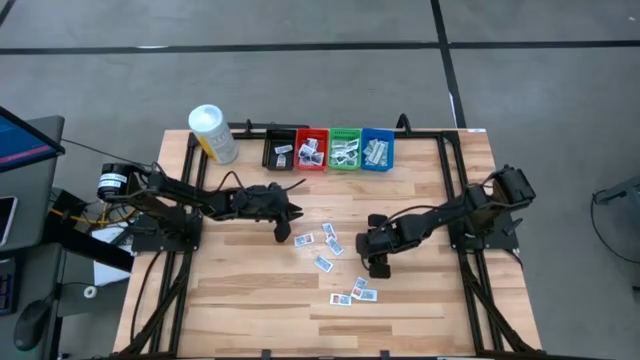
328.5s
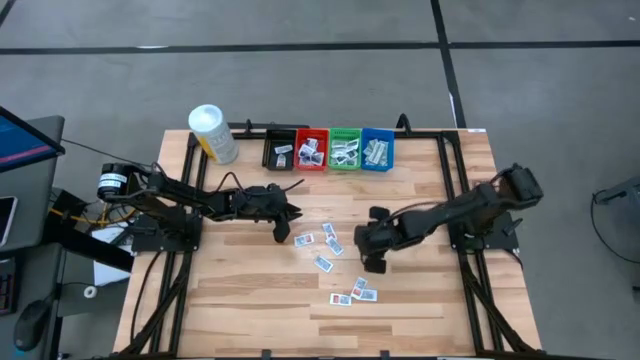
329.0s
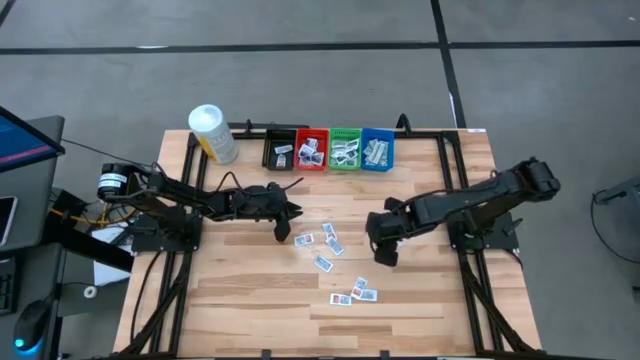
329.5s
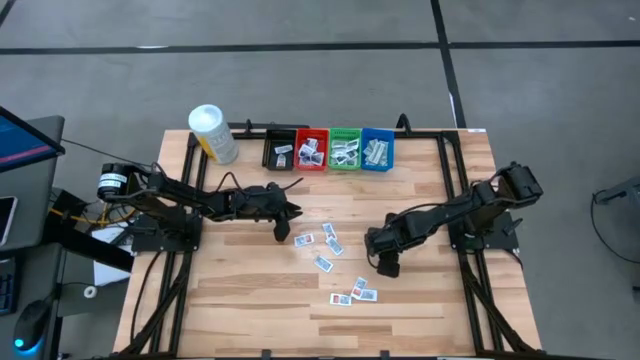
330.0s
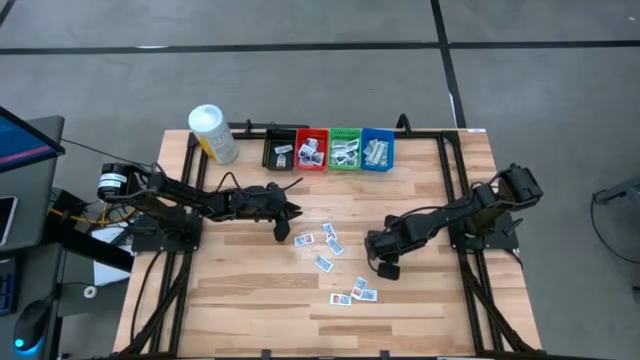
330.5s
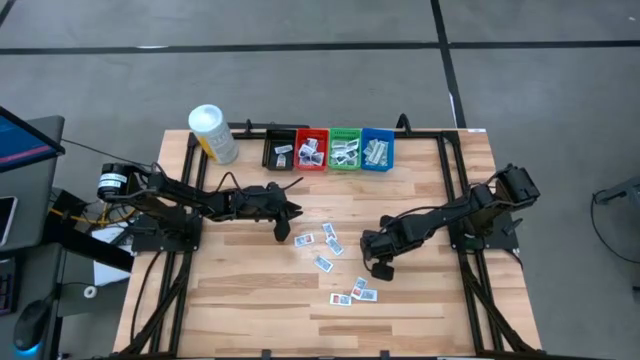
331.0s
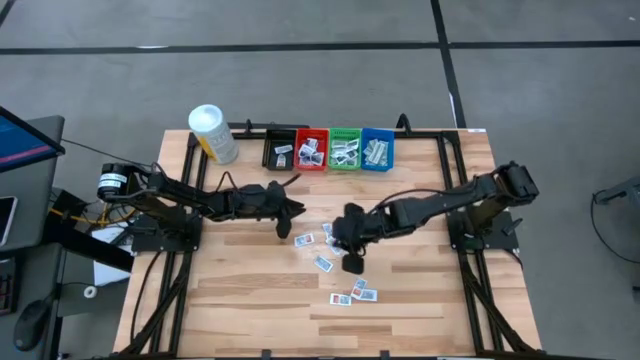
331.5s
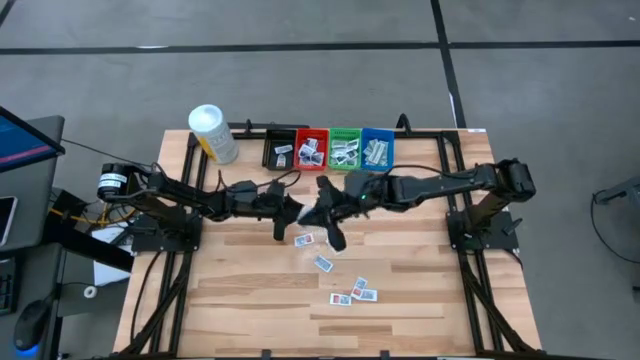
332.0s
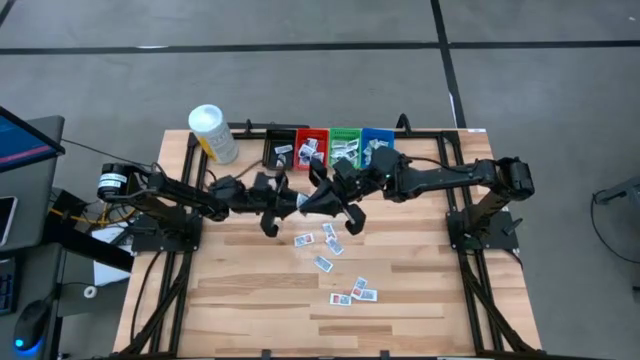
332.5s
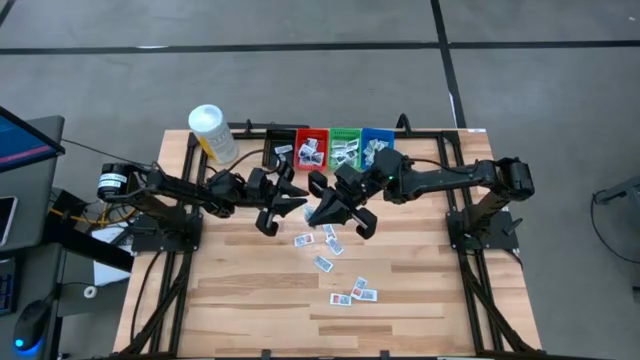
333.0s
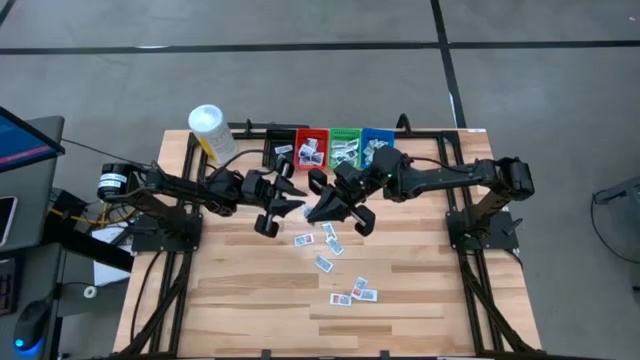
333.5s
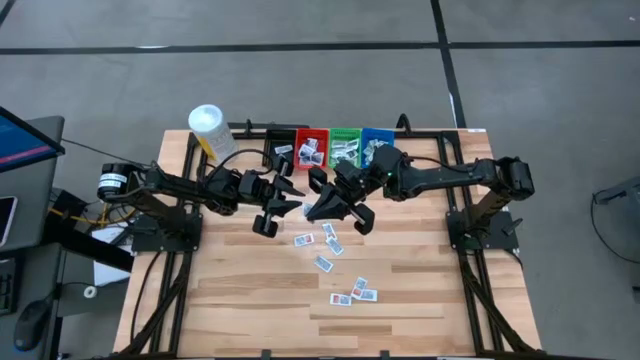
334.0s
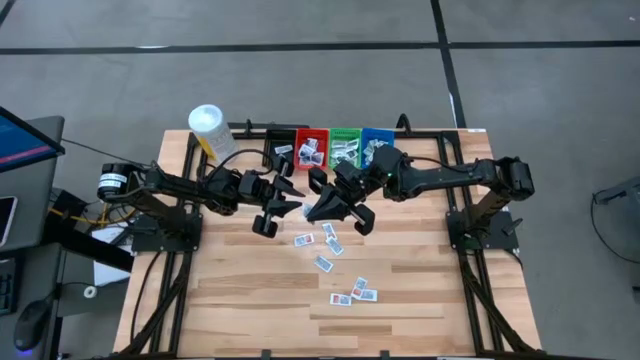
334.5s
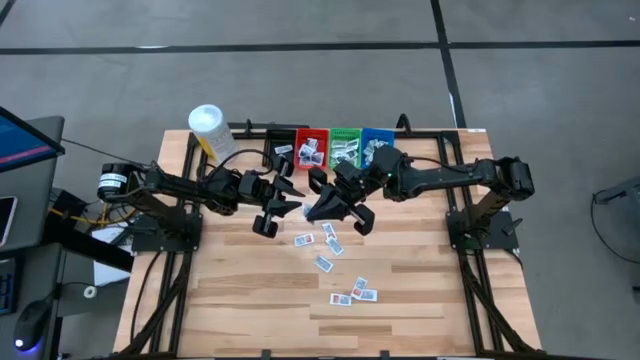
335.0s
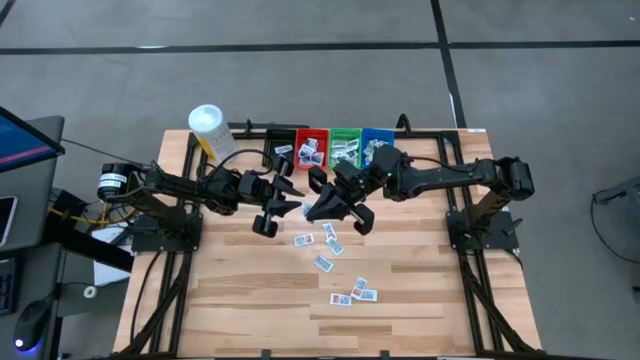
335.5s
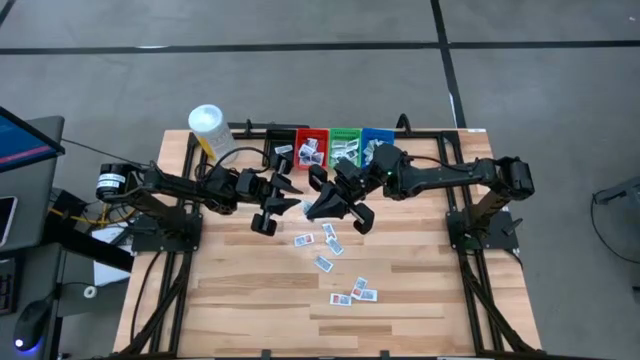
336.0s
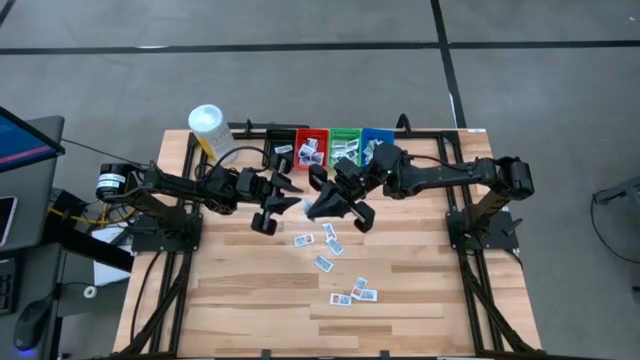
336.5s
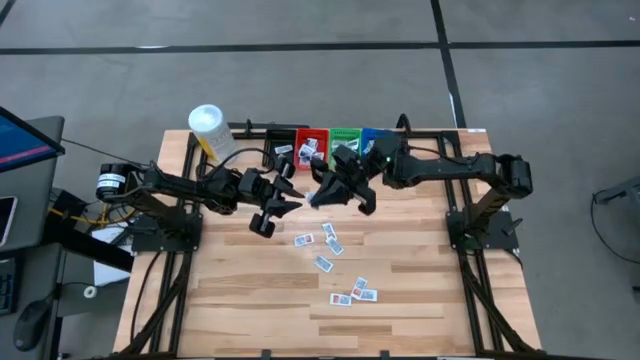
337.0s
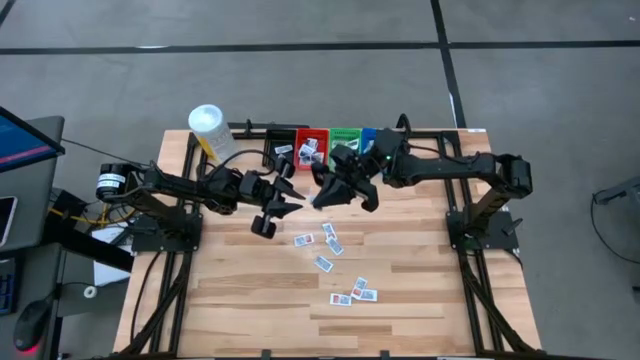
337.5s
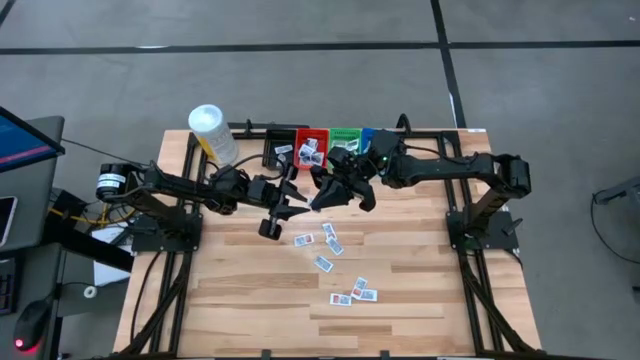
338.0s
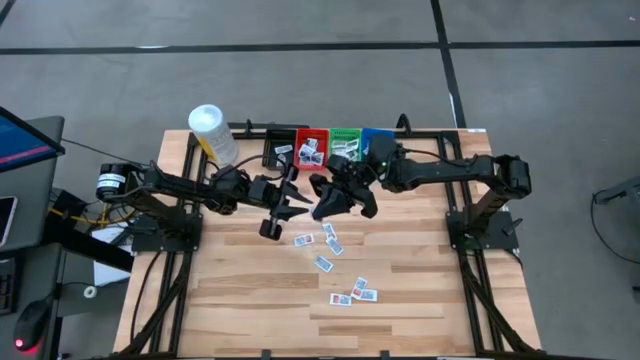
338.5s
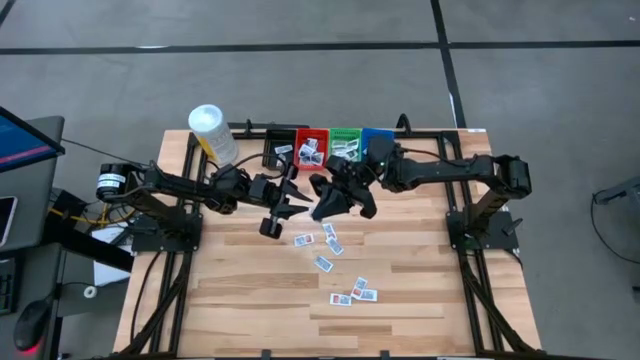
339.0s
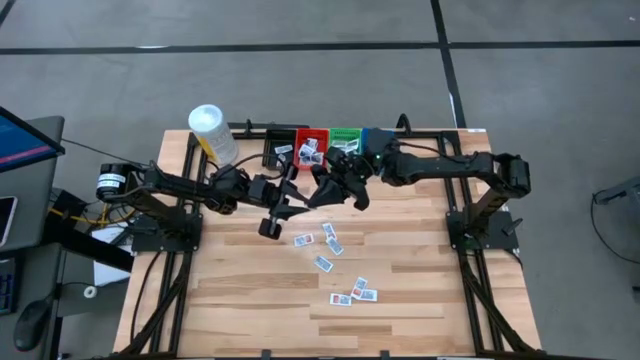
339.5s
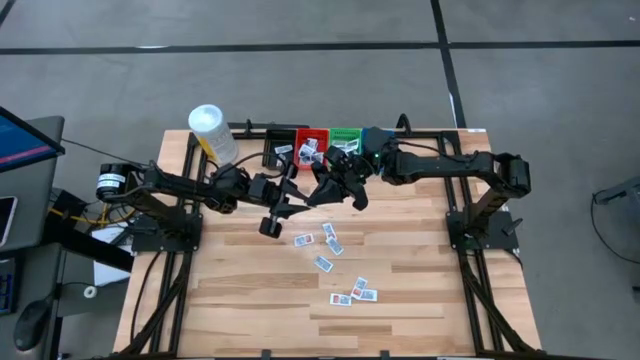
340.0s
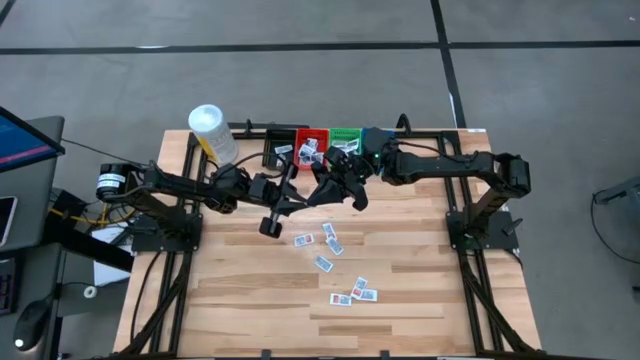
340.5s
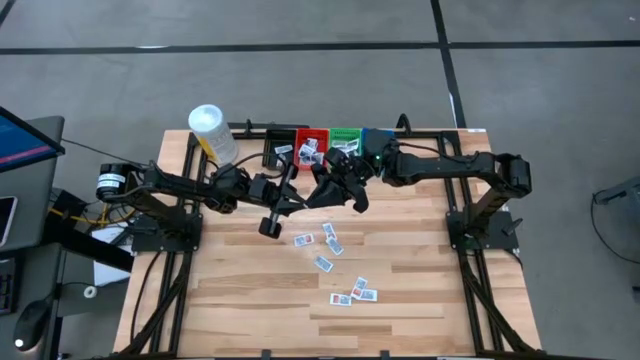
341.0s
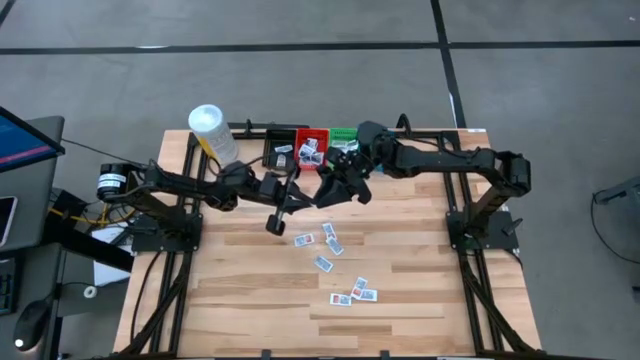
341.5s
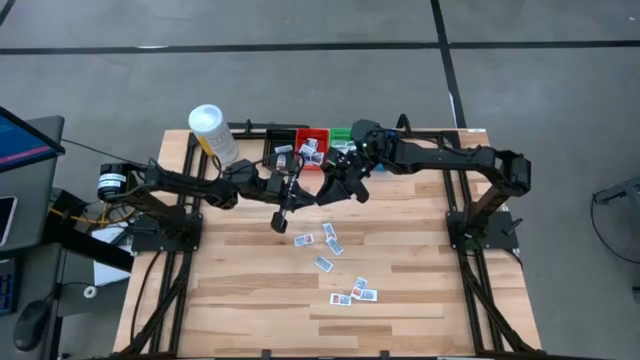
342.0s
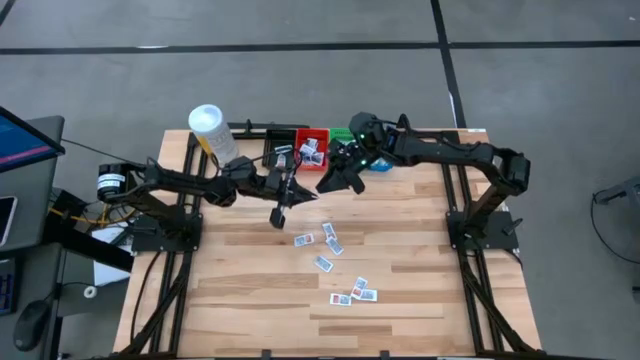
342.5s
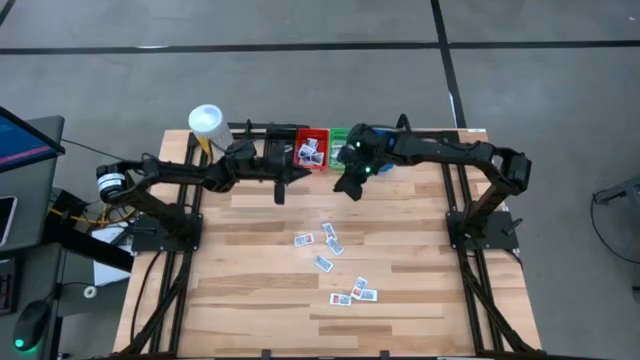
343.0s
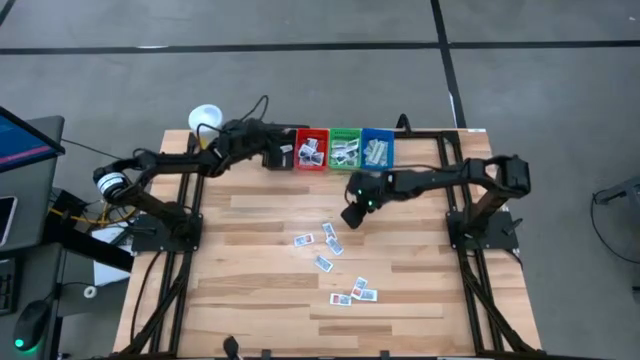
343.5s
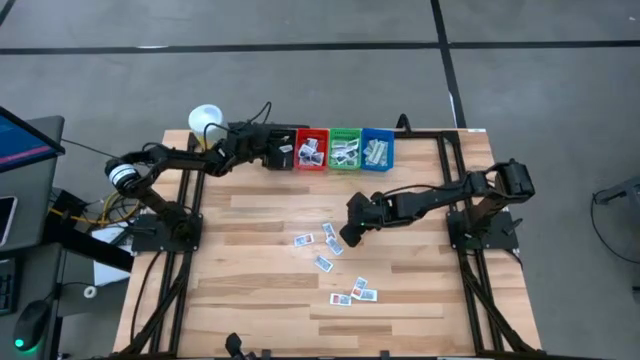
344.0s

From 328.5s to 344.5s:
Task: Pick & Place First Aid Supplies
Put the ointment pack into the black bin

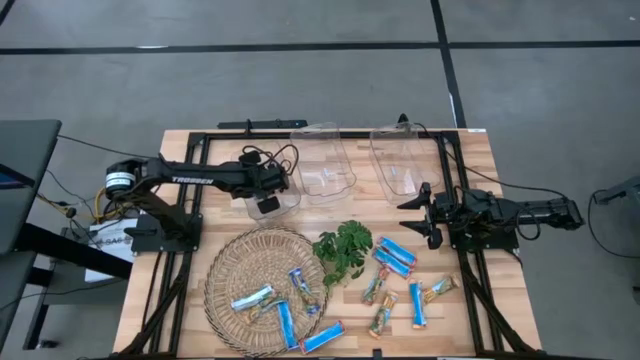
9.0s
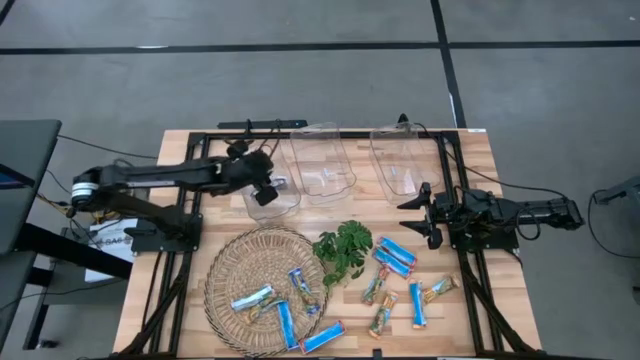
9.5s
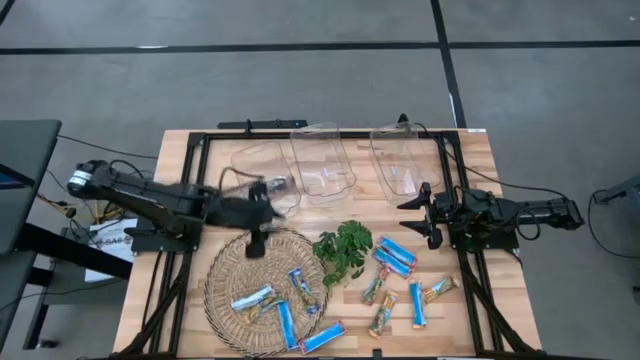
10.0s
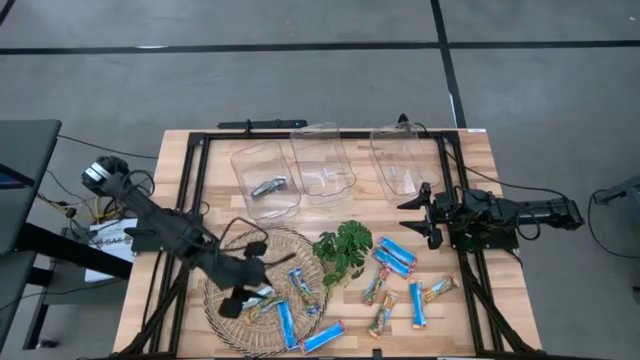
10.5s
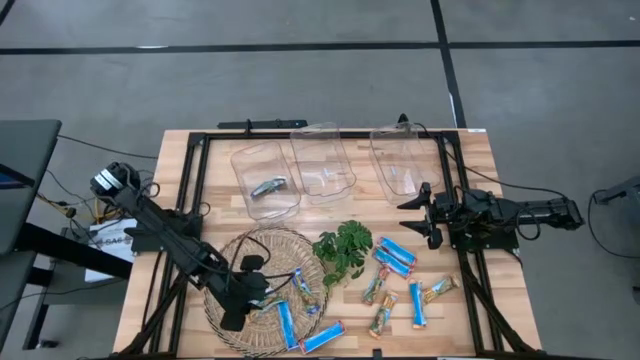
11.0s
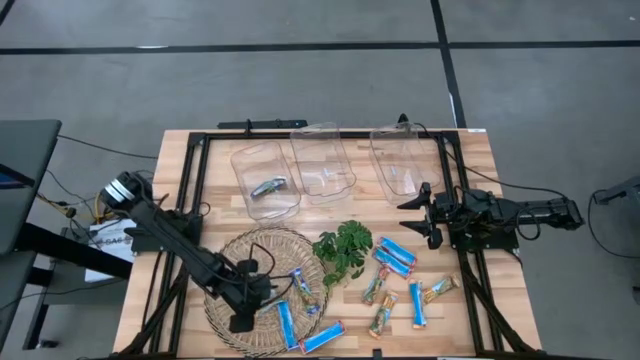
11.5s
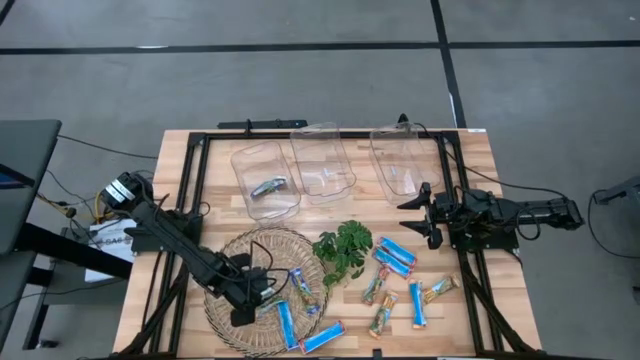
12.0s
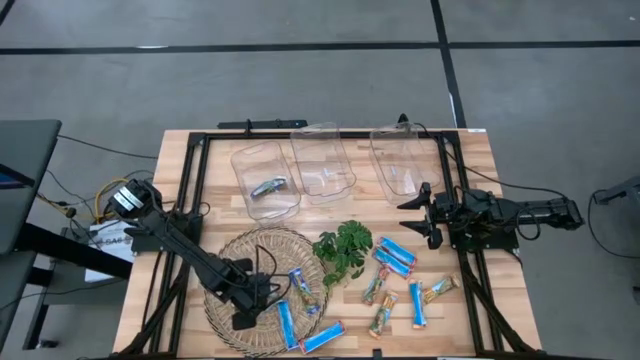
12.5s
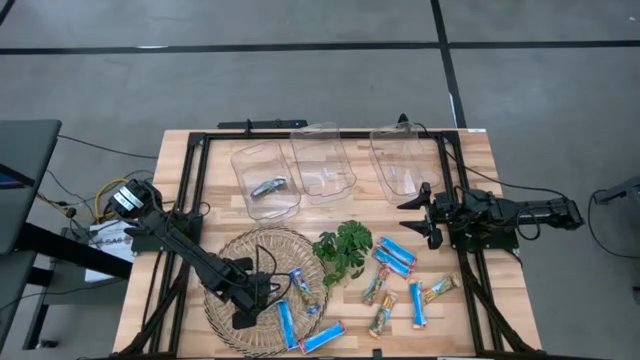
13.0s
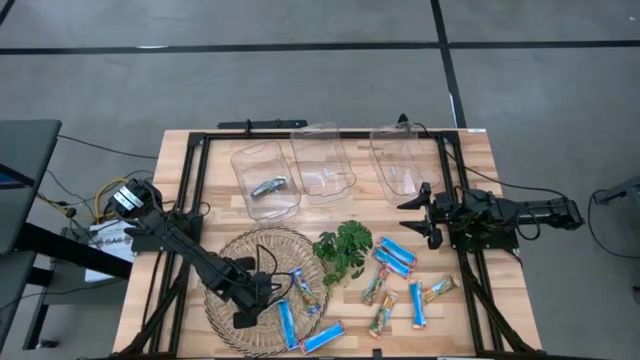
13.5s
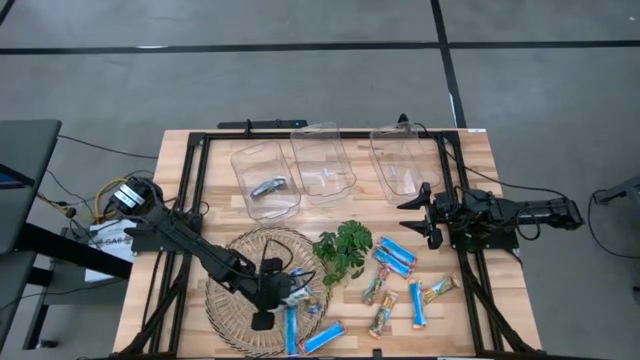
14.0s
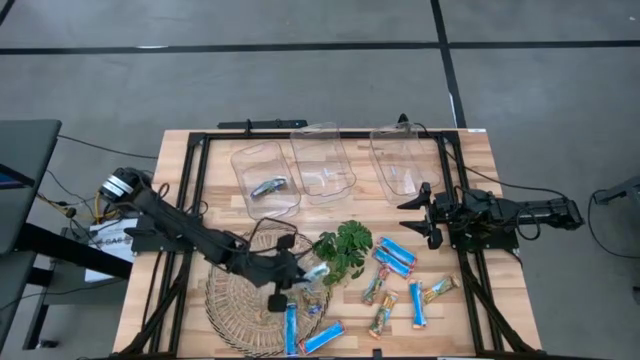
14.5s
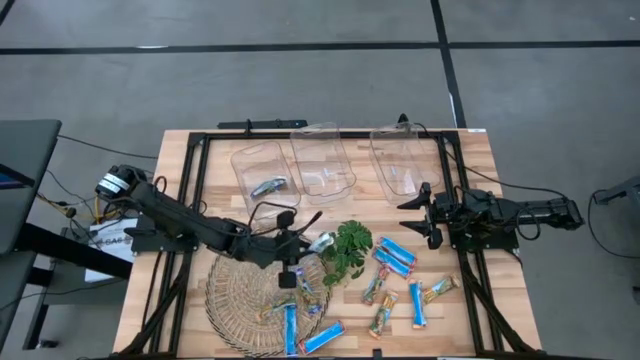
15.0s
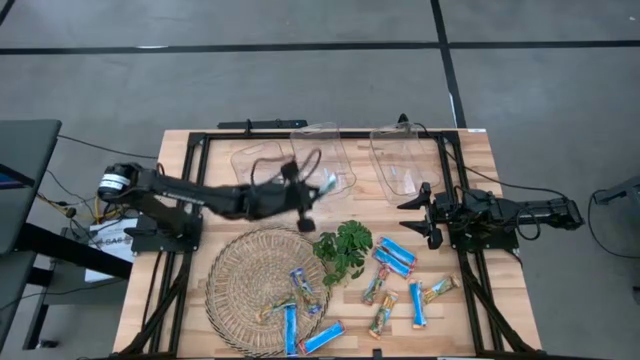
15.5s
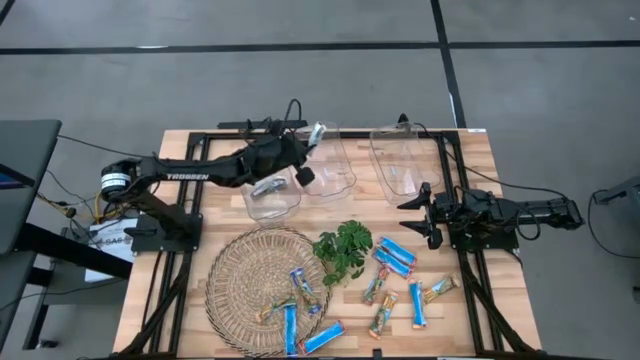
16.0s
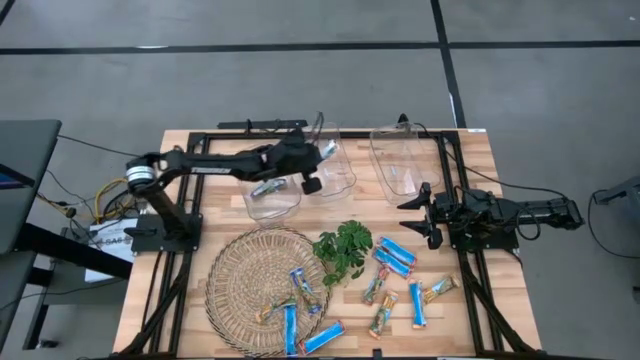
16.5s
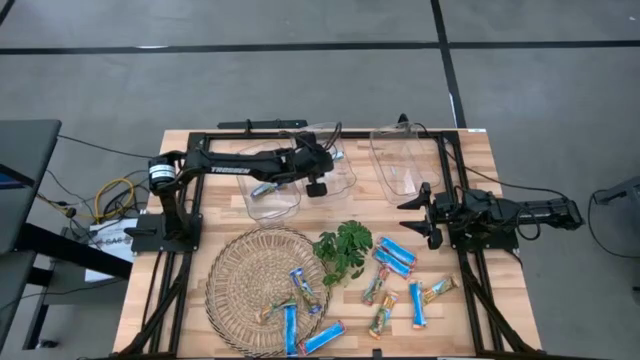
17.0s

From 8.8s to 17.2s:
Task: Pick and place Granola Bars by type
Put the yellow granola bar into the middle transparent bin
